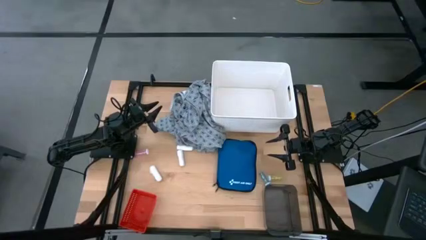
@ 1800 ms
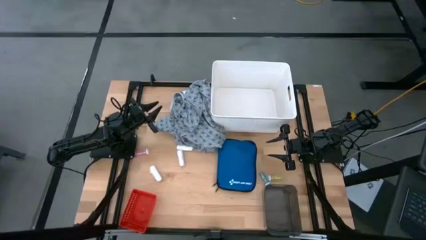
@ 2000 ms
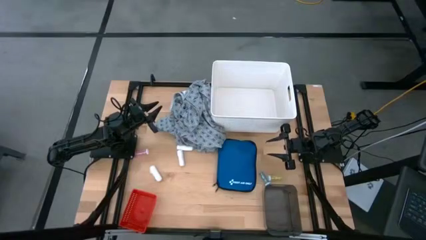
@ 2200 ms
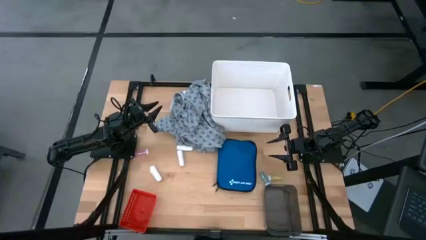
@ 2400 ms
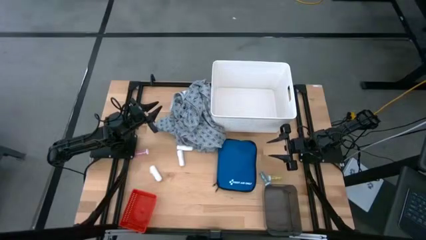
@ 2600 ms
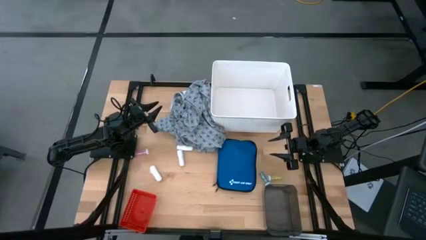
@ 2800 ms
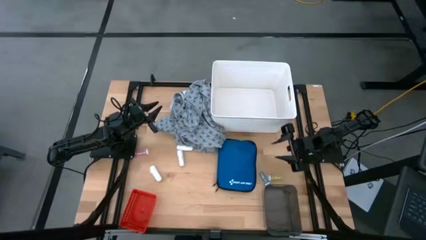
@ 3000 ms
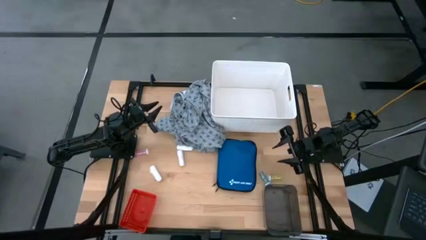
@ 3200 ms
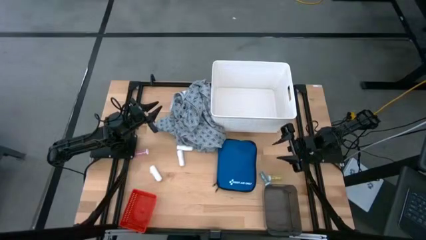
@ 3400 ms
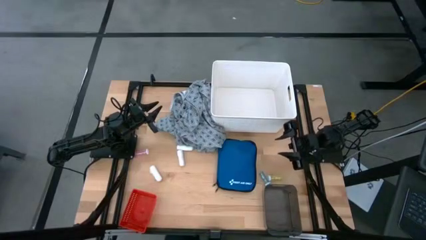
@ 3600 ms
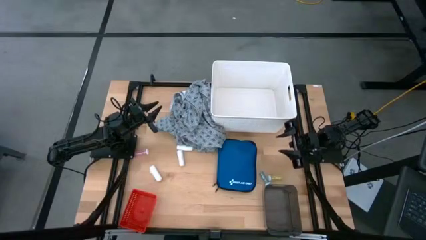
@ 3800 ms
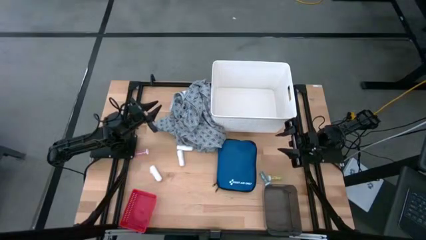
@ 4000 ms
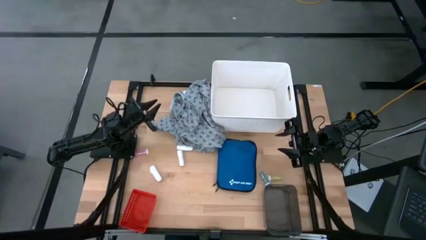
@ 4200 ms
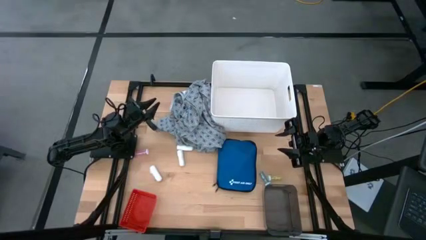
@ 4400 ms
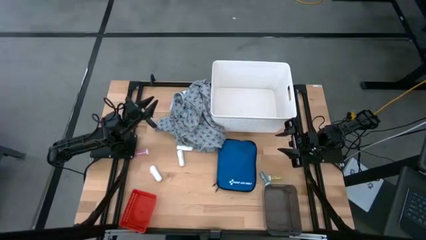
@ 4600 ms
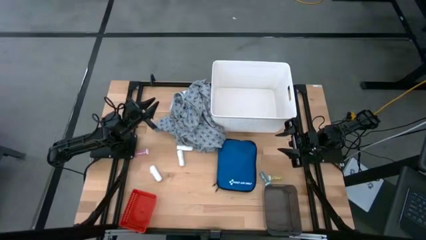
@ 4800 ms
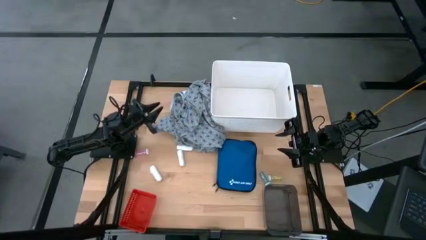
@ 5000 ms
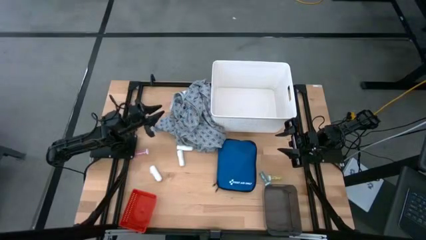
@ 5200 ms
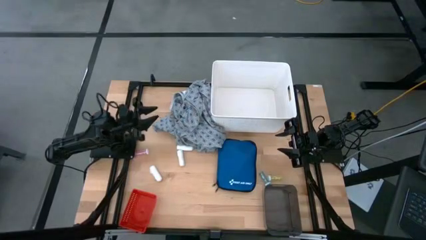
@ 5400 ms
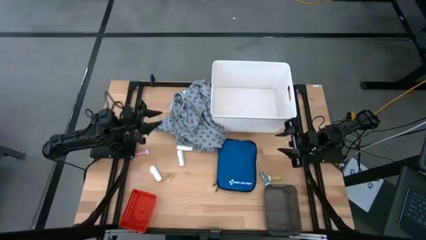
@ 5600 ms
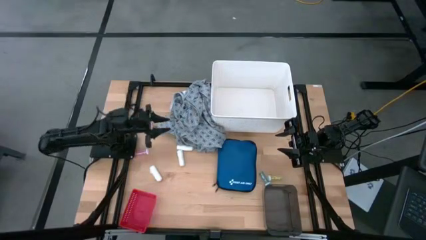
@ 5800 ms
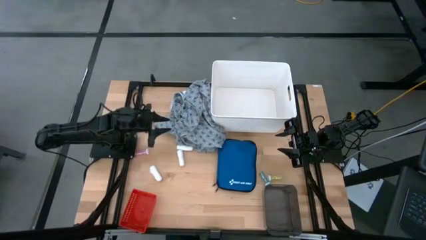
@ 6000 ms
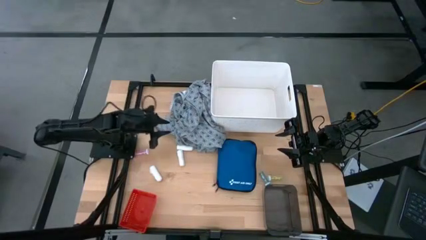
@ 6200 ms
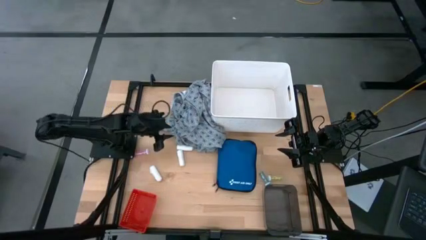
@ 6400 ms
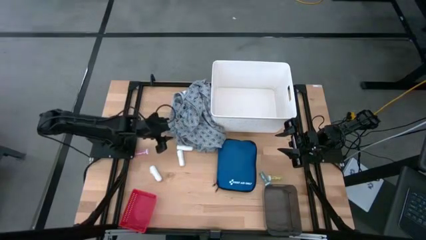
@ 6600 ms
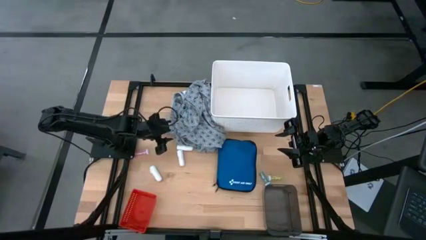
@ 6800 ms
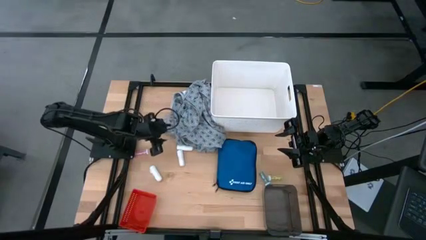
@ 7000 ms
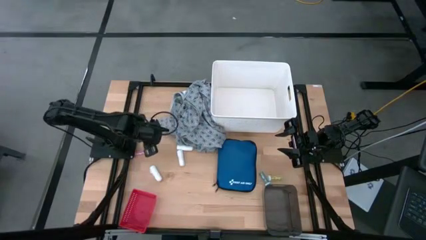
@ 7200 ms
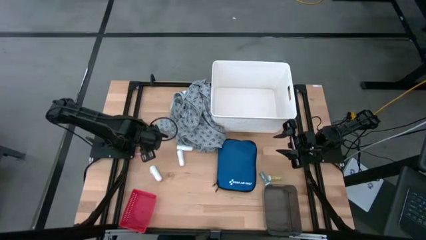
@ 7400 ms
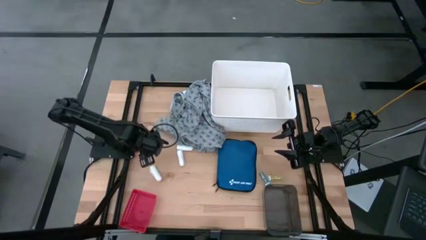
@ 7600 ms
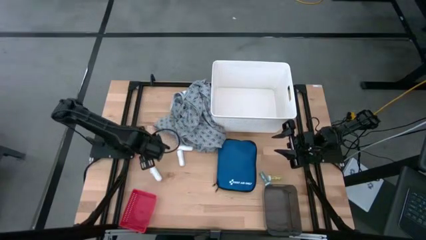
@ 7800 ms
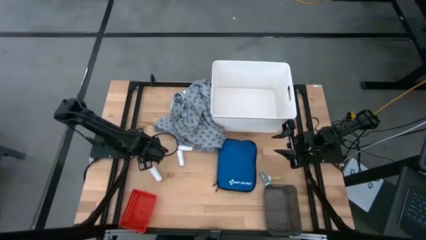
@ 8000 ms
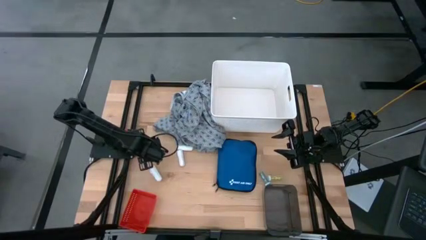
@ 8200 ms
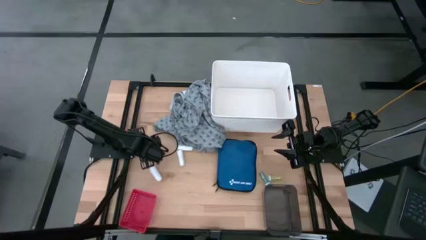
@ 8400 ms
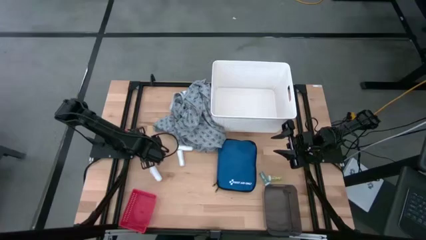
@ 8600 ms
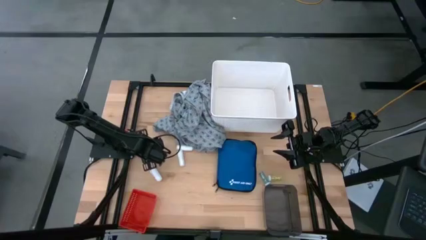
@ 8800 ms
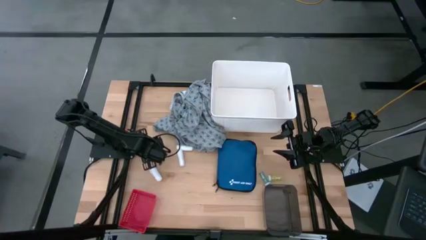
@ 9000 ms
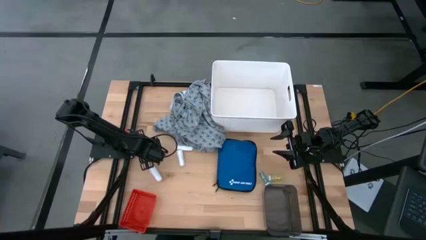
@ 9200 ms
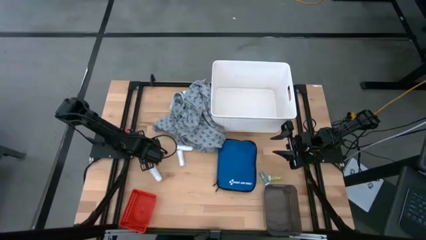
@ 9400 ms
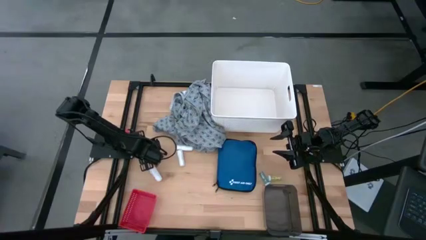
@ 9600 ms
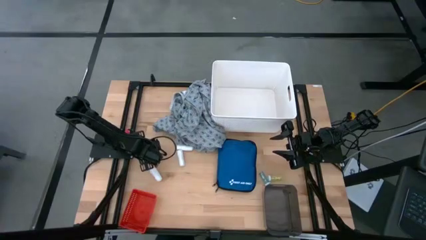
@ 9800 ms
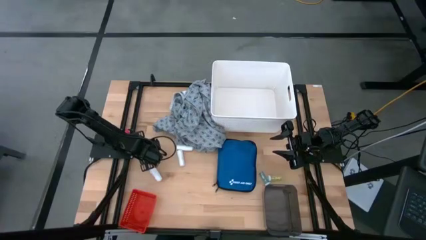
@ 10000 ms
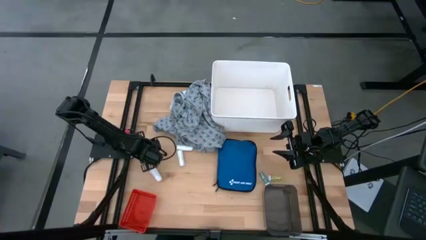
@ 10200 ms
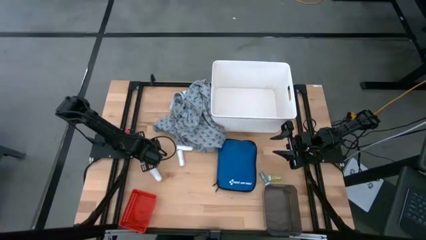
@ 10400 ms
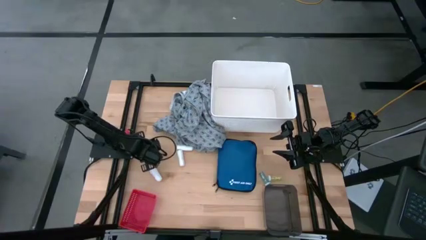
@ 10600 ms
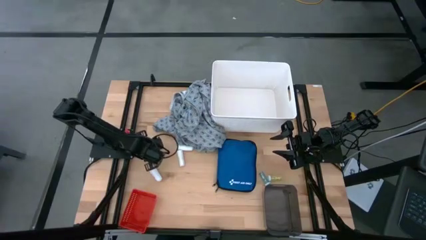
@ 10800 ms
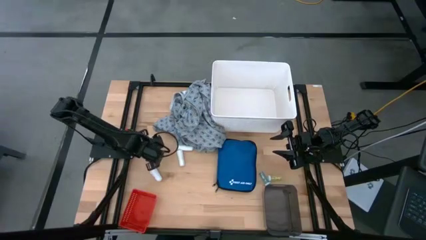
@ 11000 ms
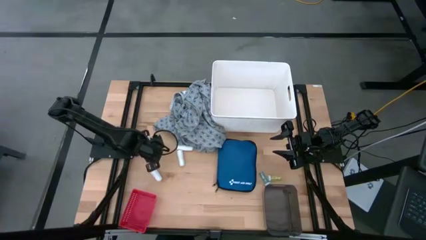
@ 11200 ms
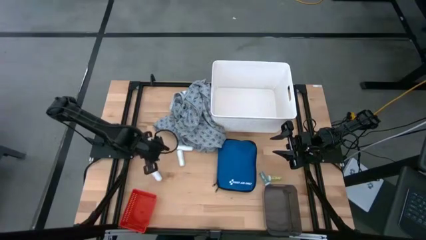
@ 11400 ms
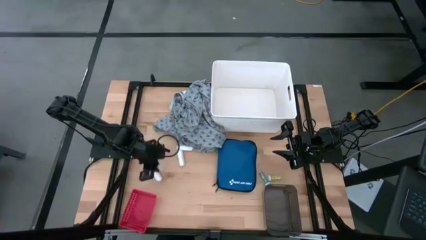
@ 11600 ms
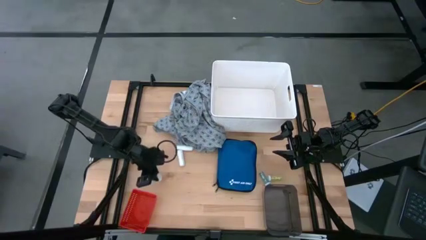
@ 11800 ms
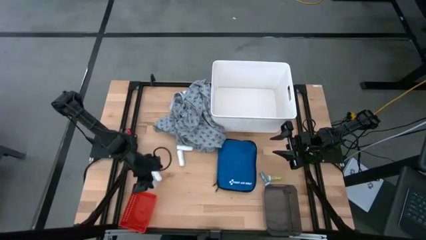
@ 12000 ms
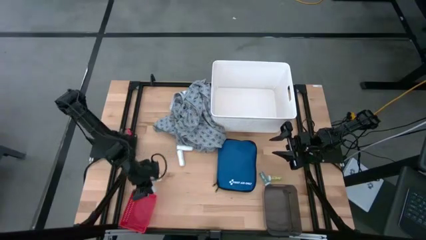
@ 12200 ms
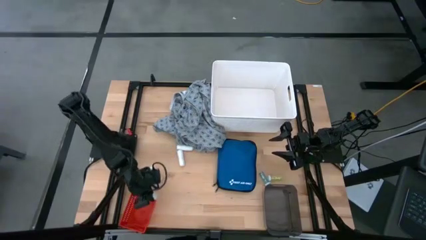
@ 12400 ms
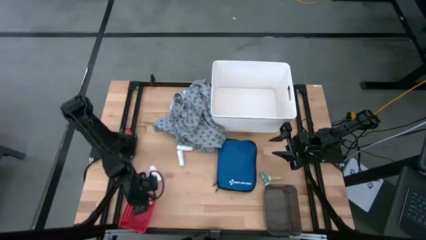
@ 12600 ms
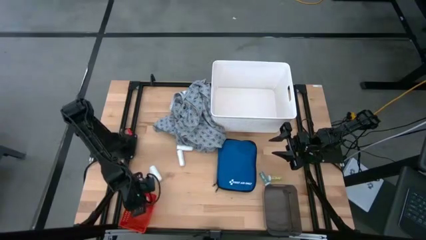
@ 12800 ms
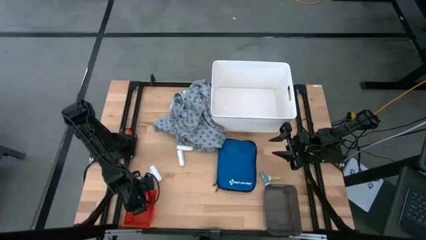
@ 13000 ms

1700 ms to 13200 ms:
Task: Pick & Place Medicine items
Put the pink pill bottle into the red bin
